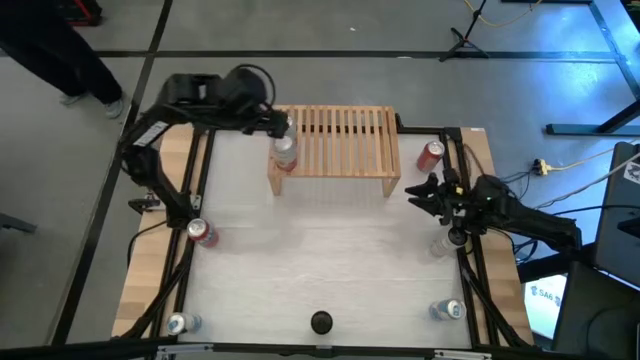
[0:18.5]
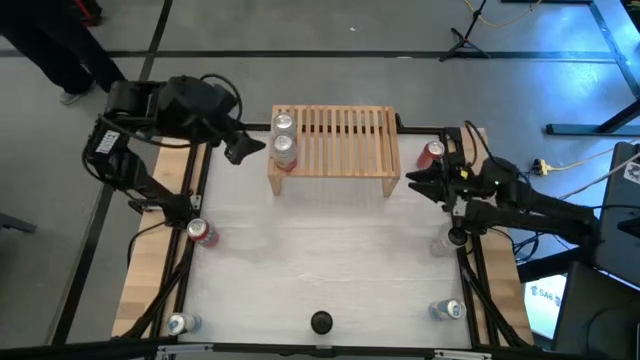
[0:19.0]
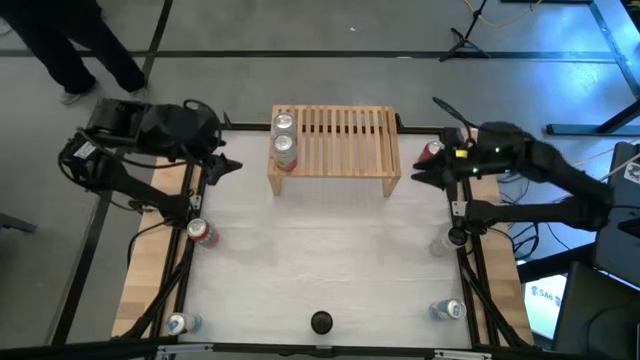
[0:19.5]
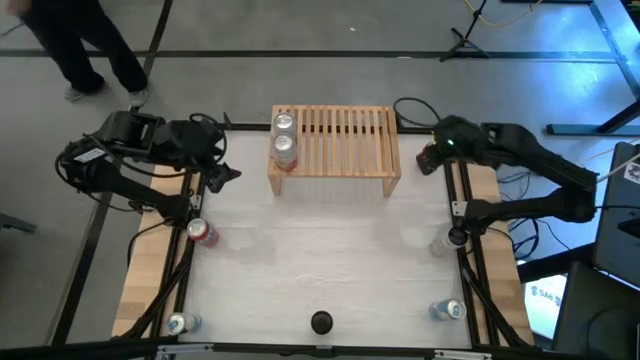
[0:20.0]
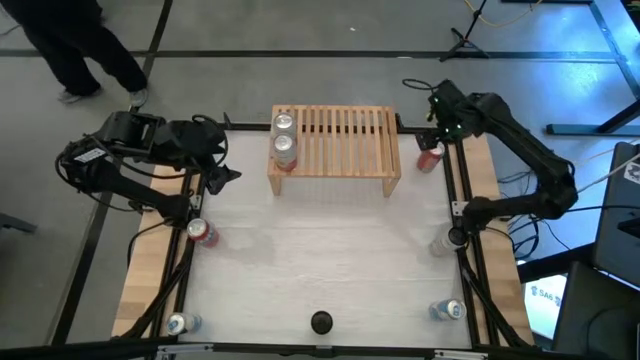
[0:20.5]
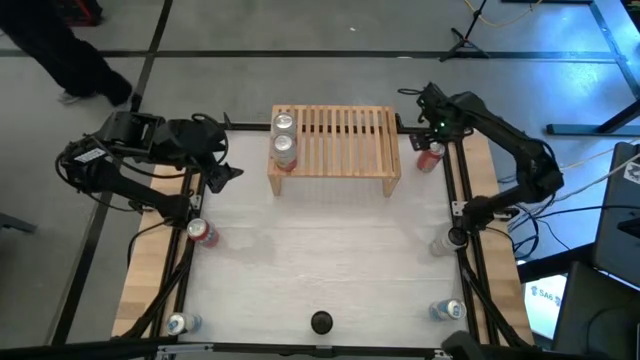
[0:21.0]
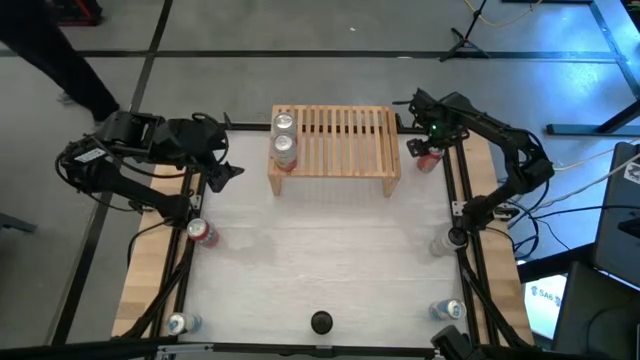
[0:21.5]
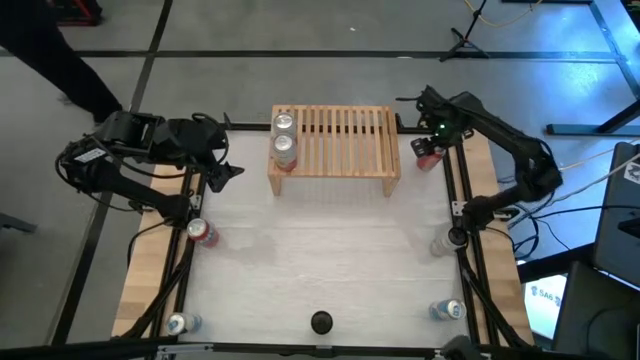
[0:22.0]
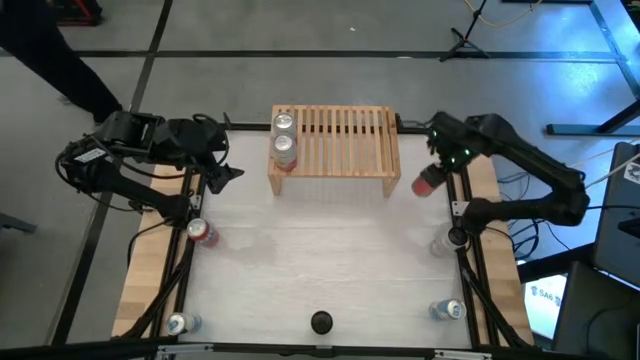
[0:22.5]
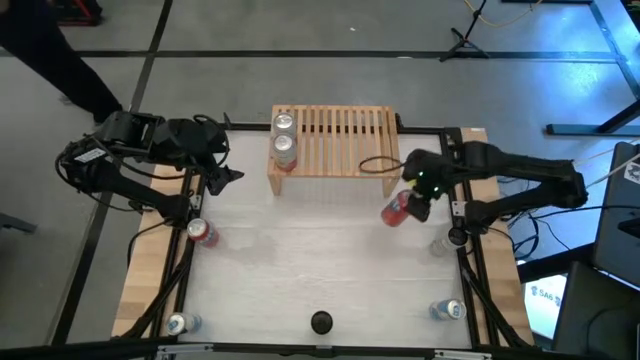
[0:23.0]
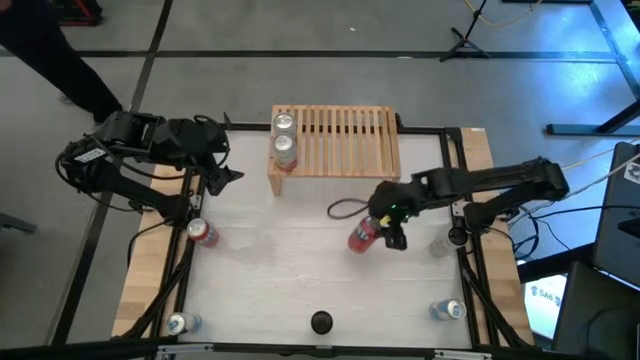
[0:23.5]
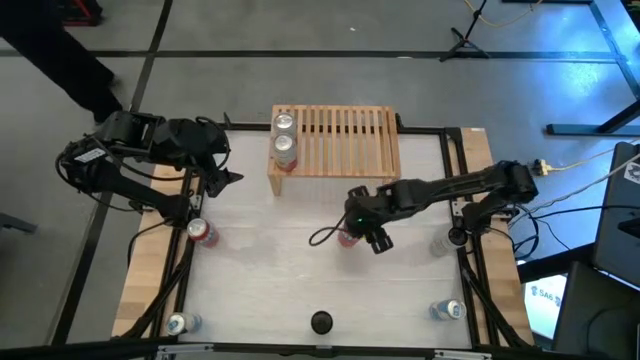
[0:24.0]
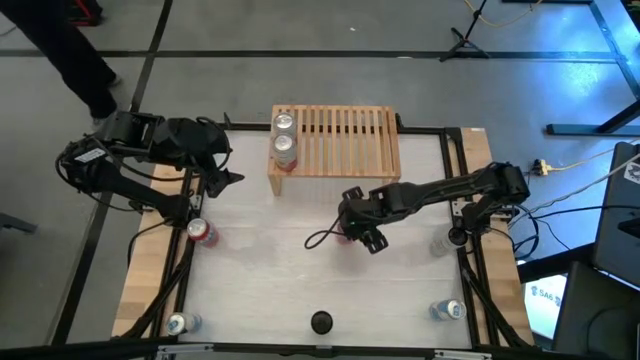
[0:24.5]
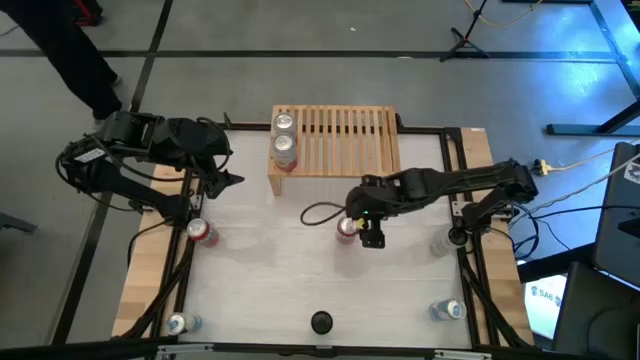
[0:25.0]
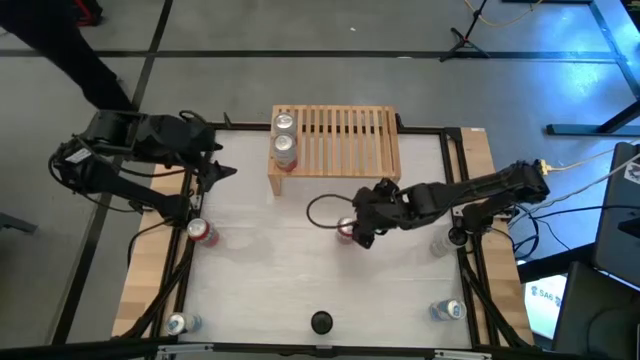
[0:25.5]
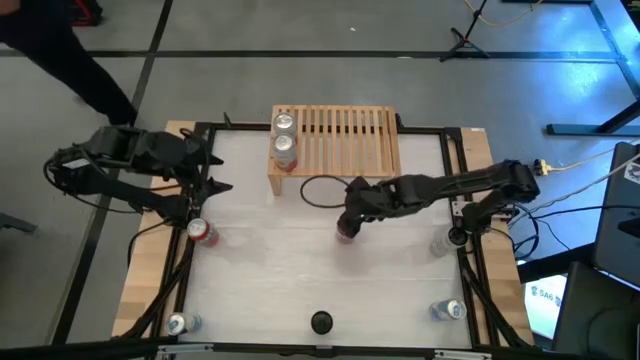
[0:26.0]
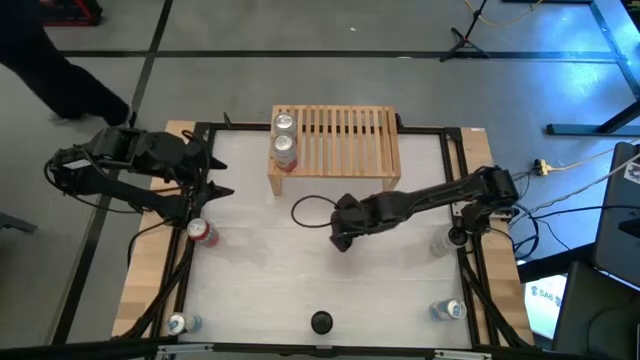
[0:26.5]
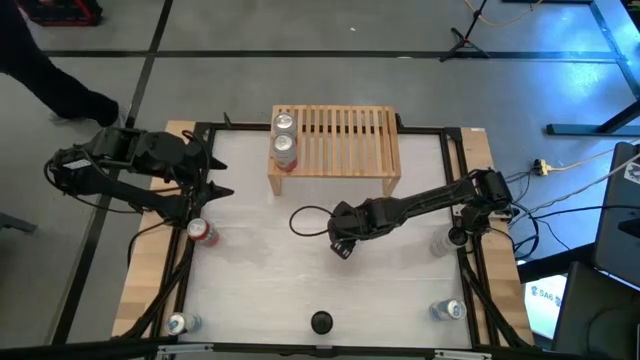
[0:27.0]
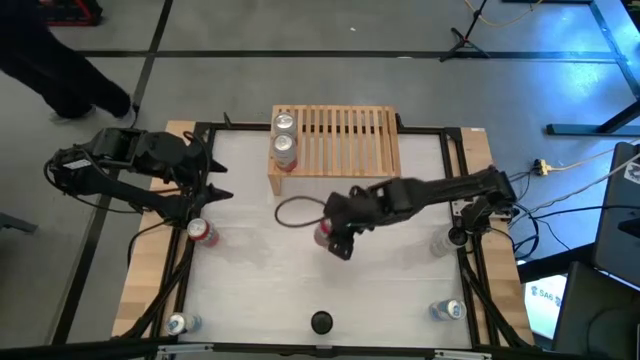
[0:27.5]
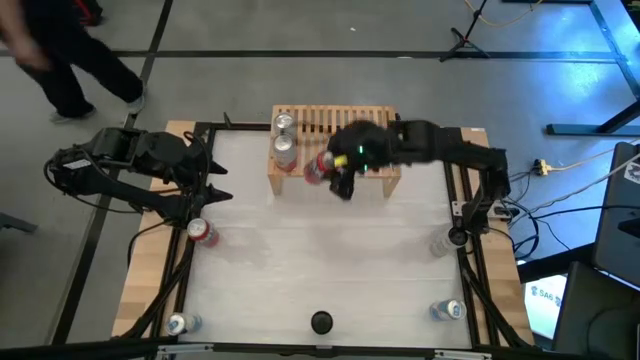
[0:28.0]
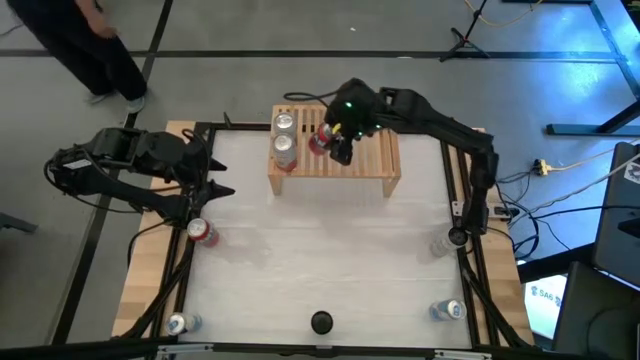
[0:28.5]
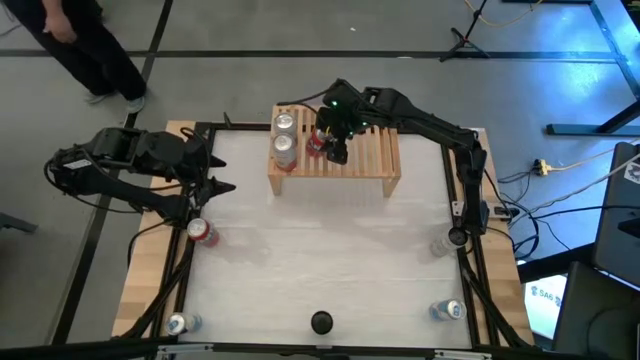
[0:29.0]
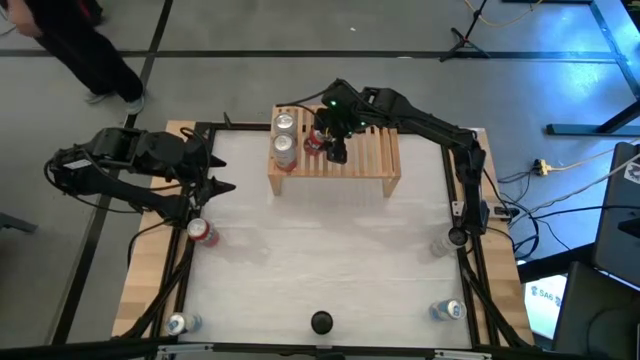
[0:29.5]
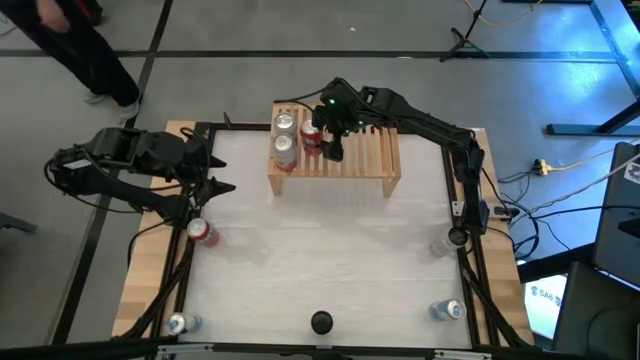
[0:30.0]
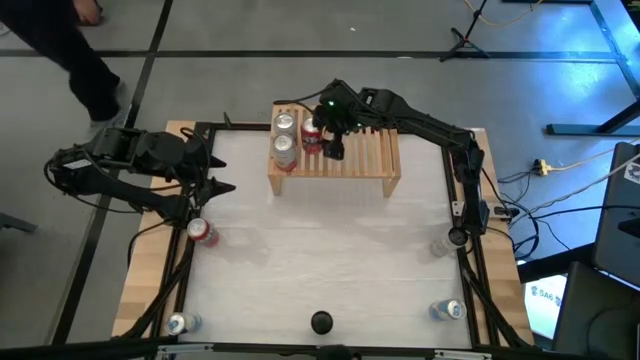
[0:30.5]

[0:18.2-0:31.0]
Task: Place canned beverage on shelf
Put the top orange soda can on the shelf

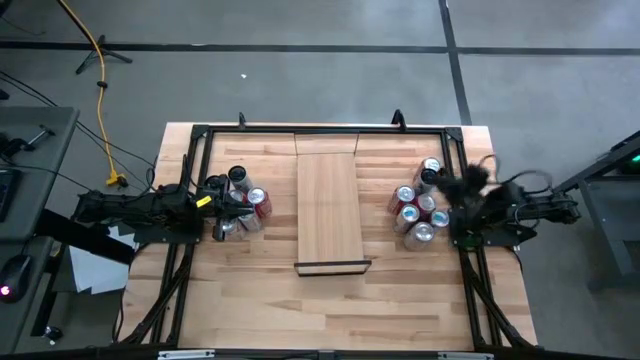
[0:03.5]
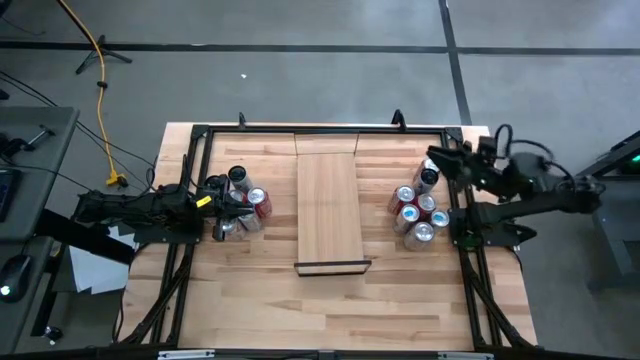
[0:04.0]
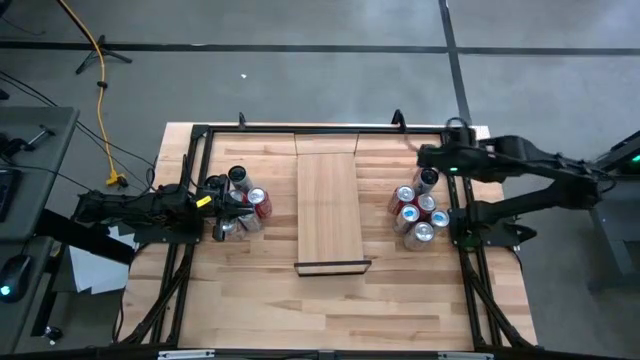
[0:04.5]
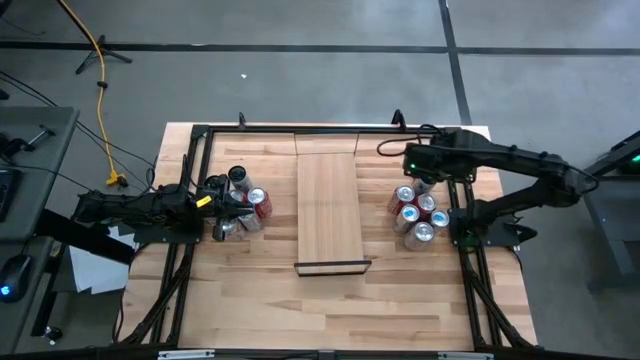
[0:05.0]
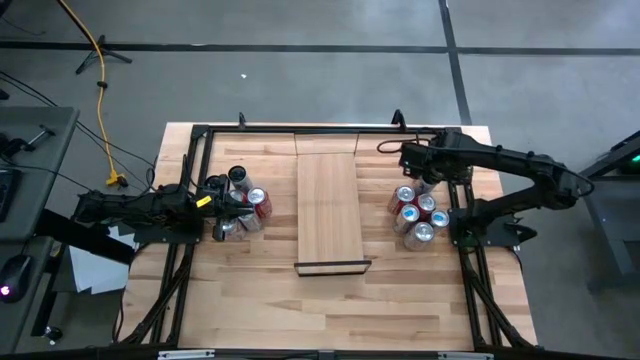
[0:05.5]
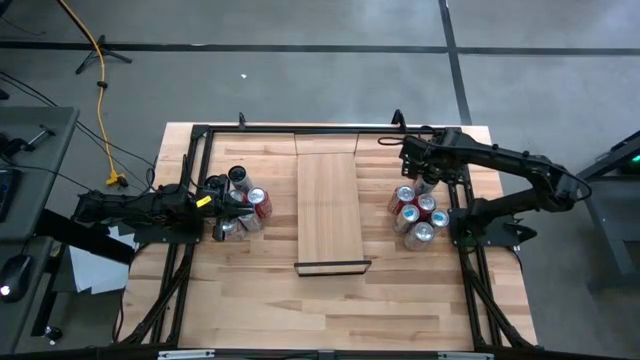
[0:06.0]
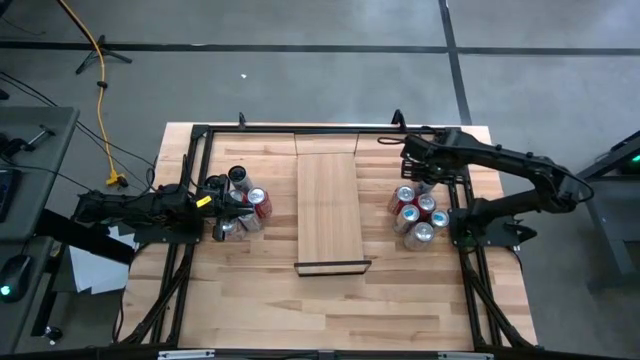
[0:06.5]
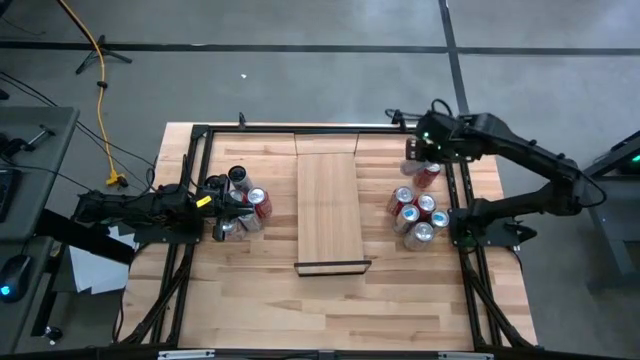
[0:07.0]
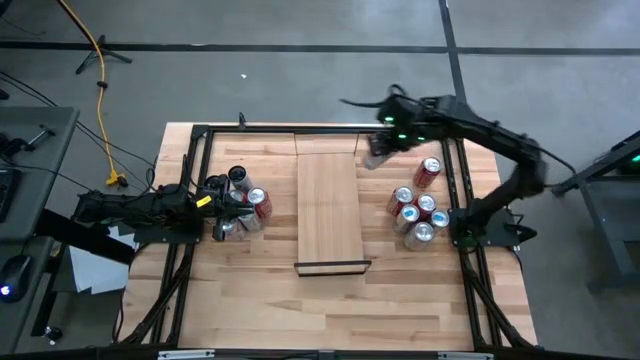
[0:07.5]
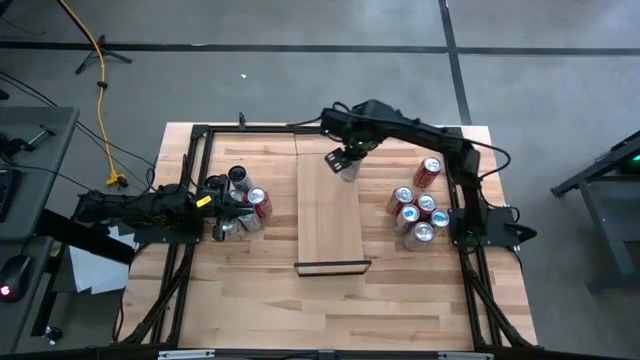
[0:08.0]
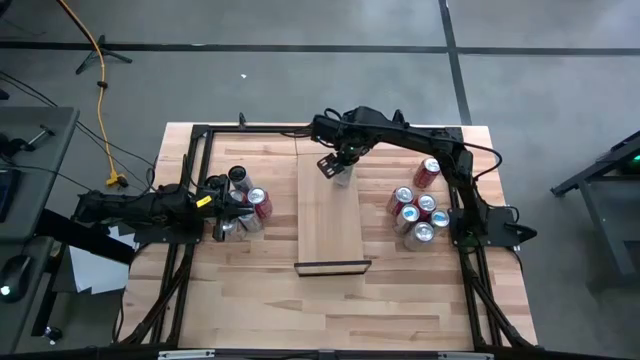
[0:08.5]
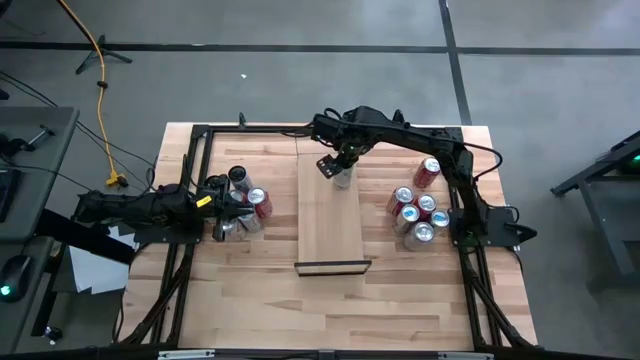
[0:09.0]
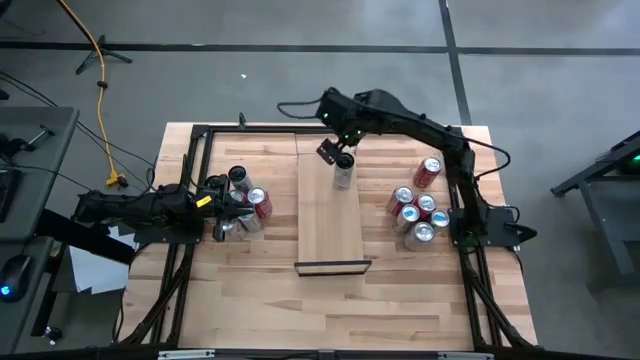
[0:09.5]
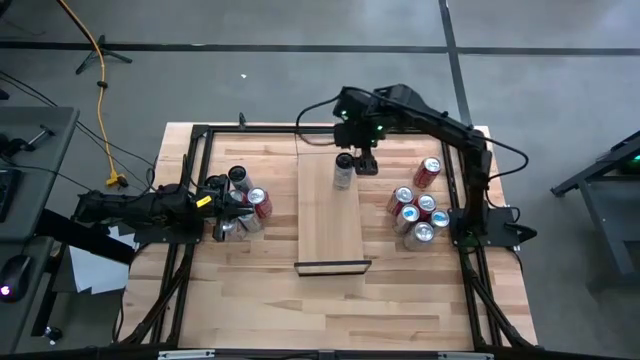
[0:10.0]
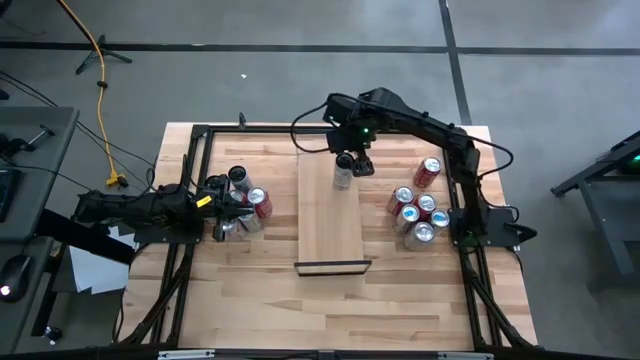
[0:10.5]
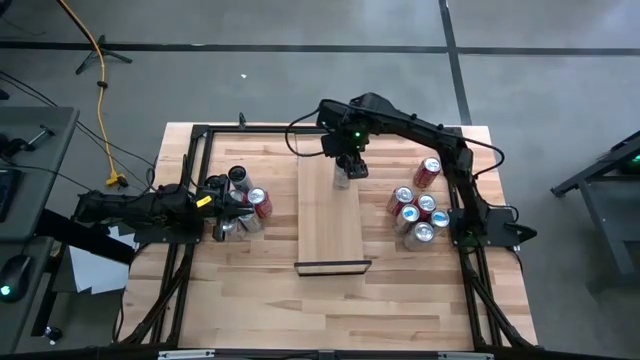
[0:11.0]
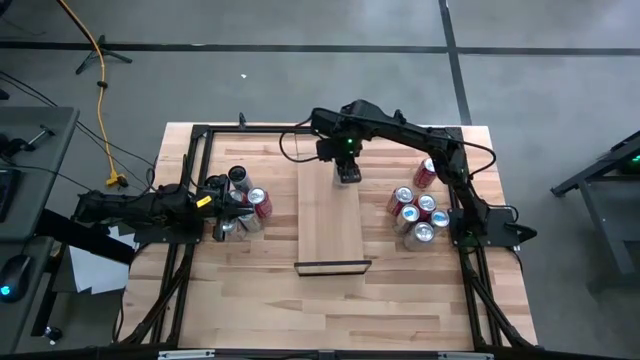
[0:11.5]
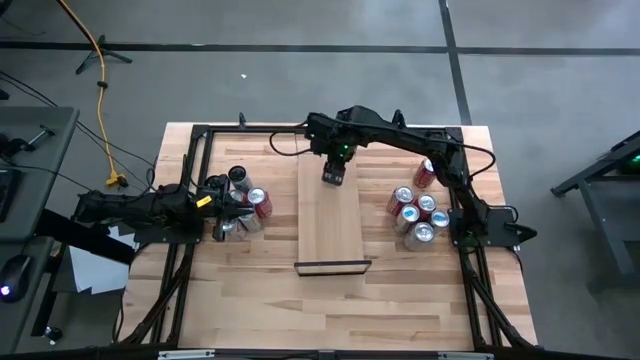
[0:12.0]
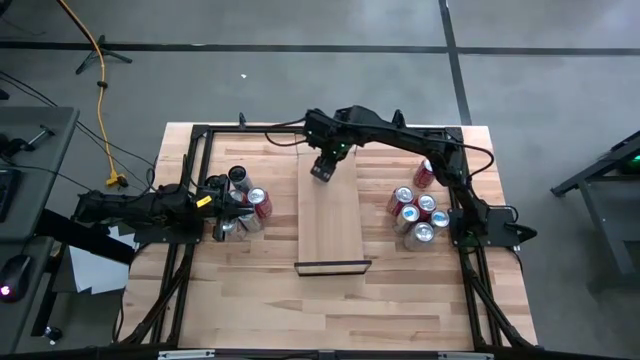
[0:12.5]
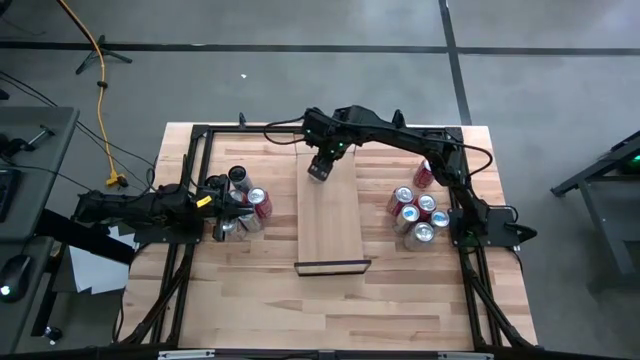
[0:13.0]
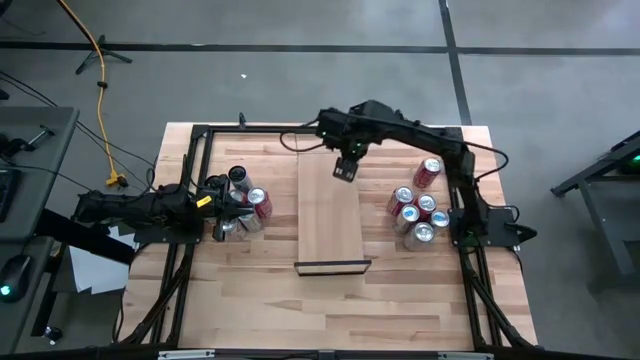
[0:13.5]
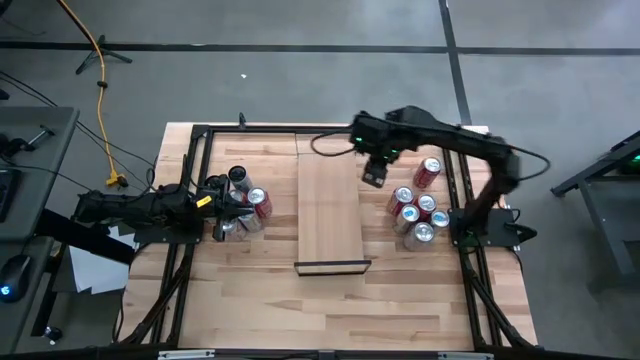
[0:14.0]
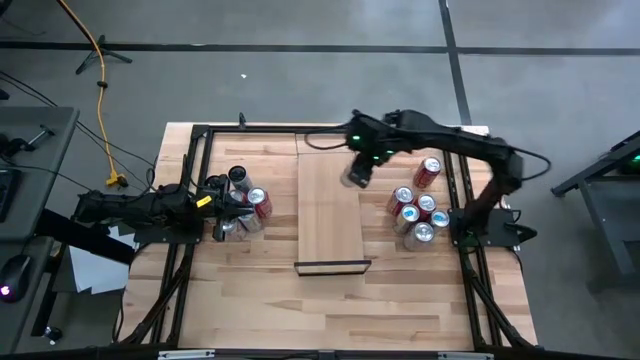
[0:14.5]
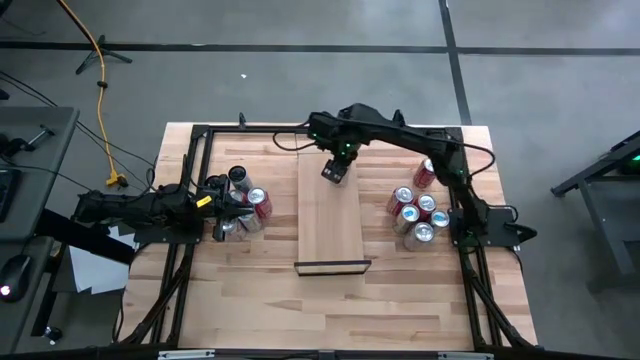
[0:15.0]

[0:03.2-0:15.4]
Task: Place canned beverage on shelf
Put the top right white/pink soda can on the shelf
